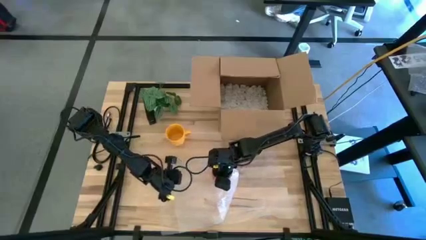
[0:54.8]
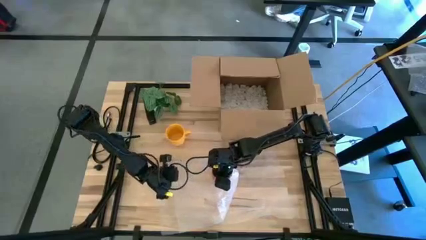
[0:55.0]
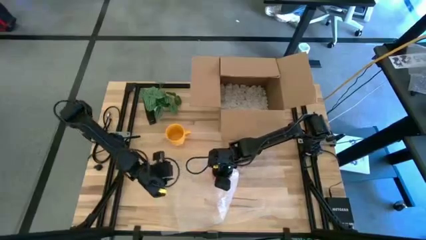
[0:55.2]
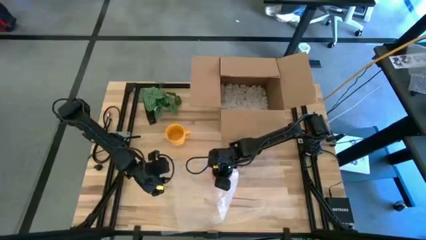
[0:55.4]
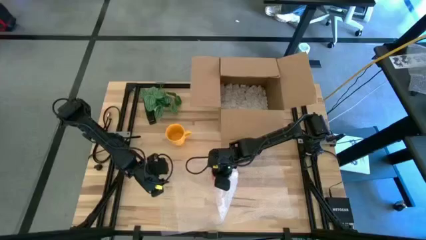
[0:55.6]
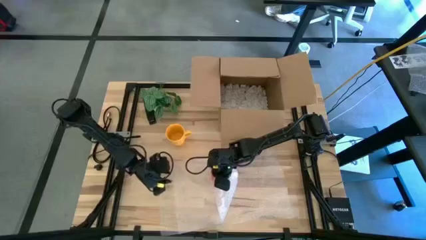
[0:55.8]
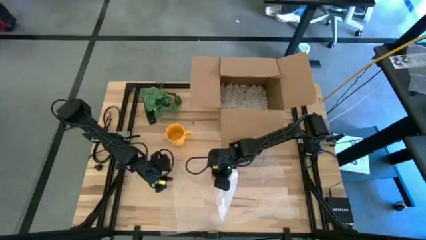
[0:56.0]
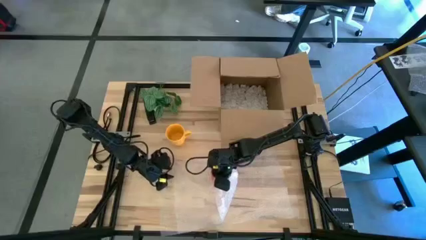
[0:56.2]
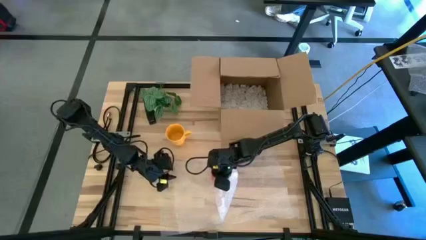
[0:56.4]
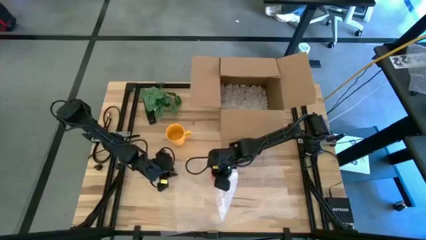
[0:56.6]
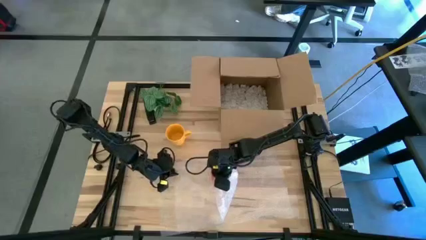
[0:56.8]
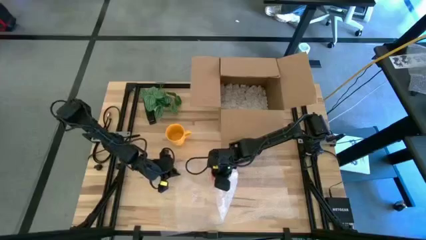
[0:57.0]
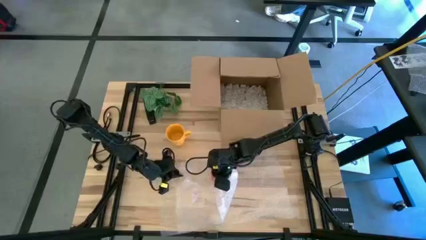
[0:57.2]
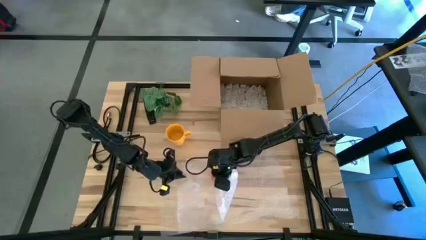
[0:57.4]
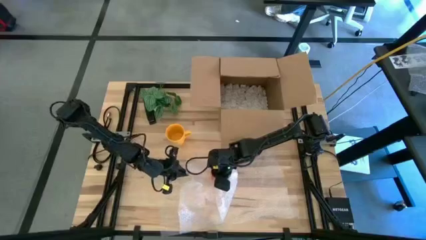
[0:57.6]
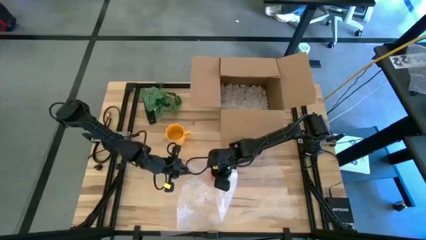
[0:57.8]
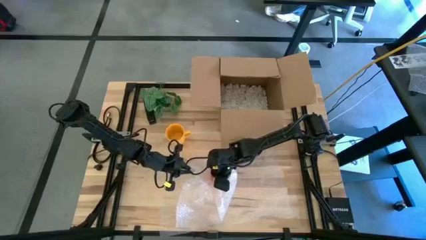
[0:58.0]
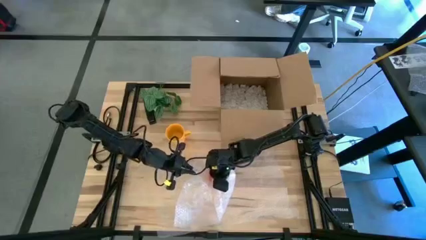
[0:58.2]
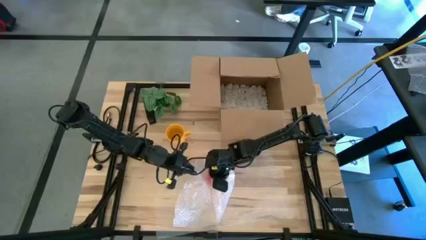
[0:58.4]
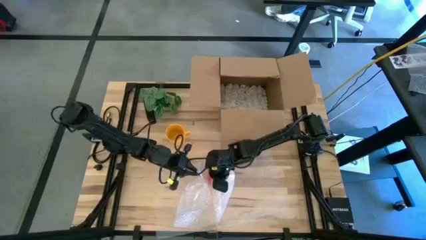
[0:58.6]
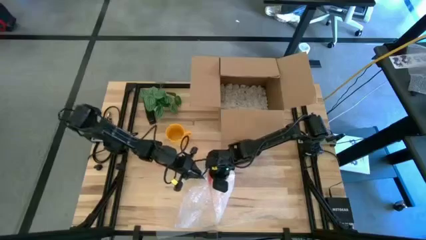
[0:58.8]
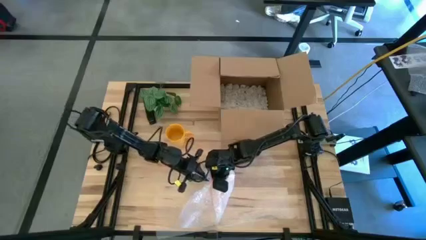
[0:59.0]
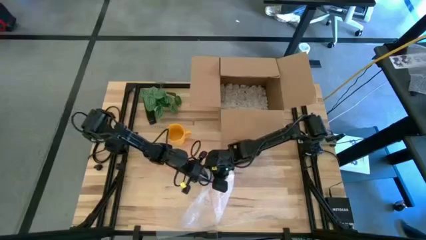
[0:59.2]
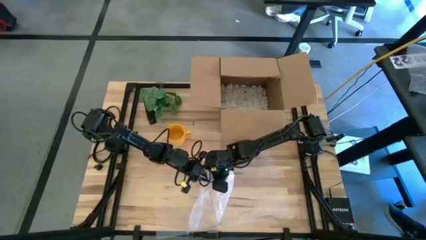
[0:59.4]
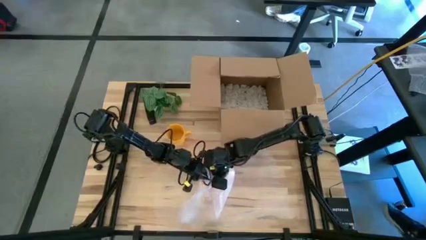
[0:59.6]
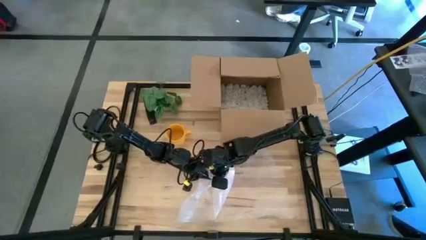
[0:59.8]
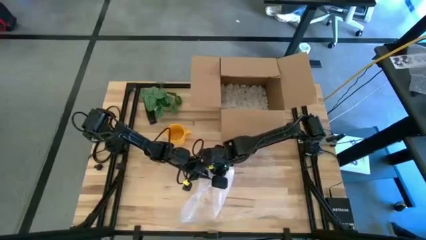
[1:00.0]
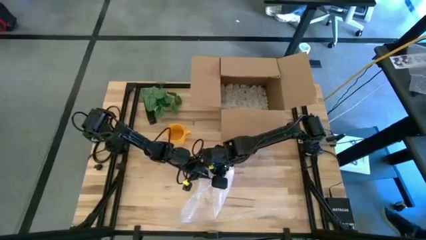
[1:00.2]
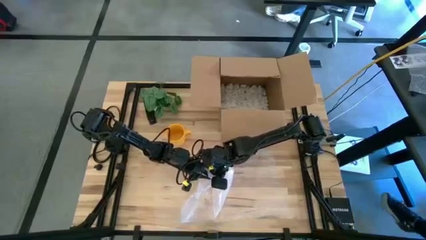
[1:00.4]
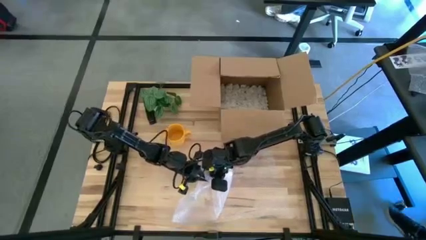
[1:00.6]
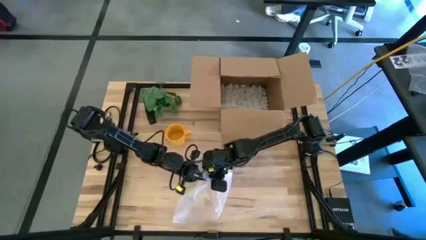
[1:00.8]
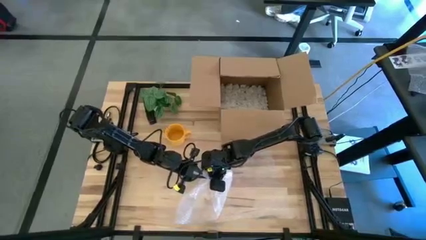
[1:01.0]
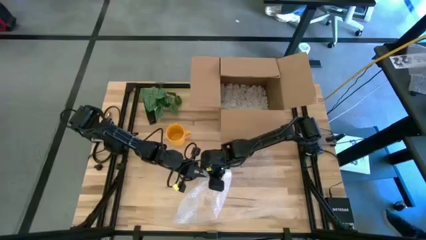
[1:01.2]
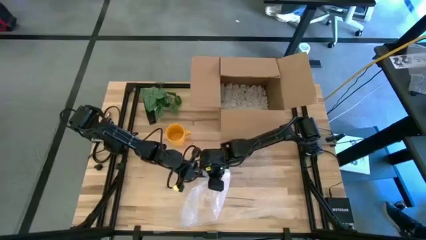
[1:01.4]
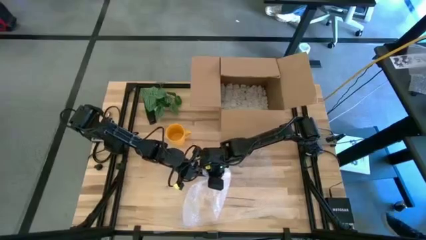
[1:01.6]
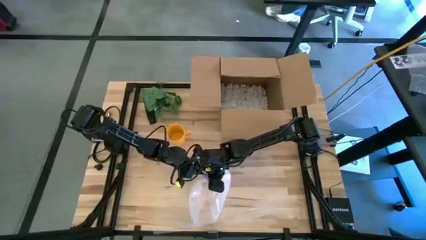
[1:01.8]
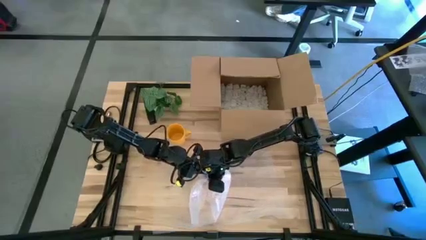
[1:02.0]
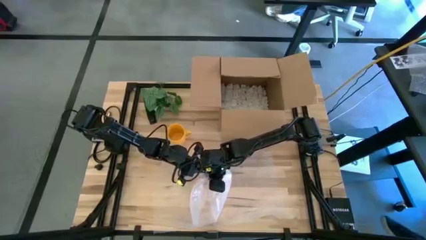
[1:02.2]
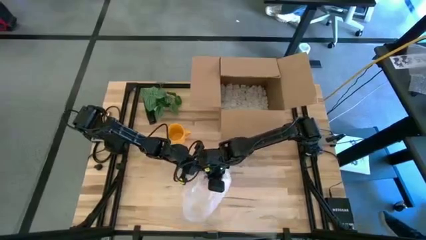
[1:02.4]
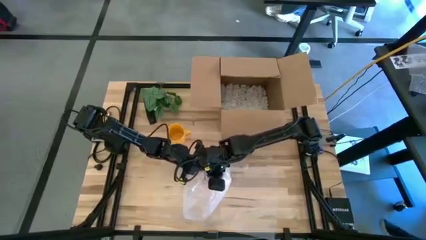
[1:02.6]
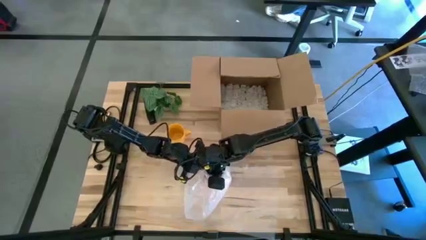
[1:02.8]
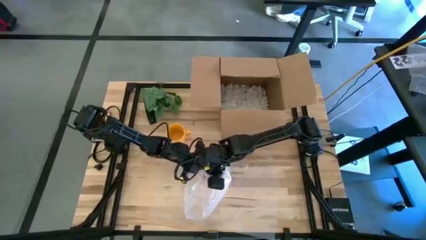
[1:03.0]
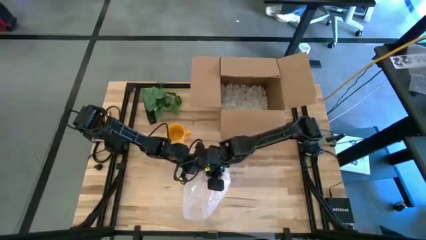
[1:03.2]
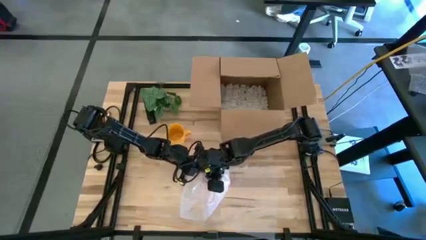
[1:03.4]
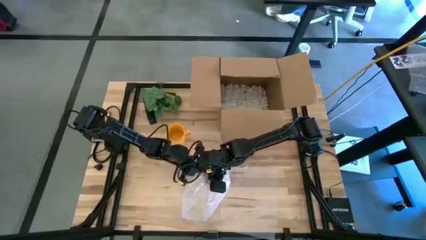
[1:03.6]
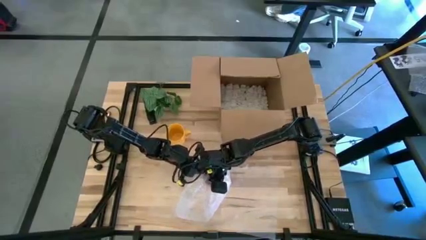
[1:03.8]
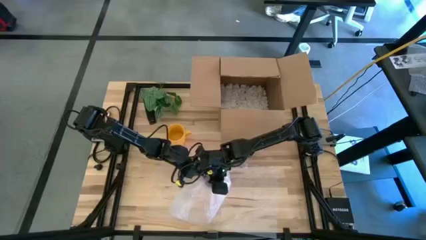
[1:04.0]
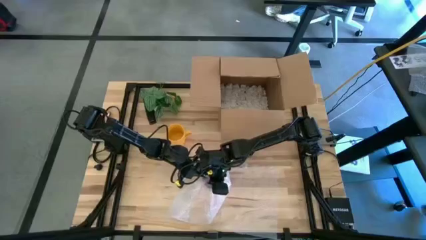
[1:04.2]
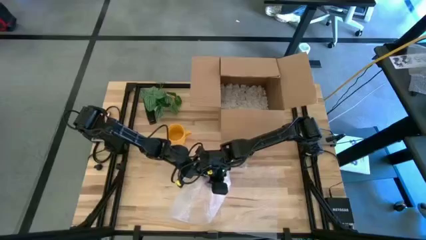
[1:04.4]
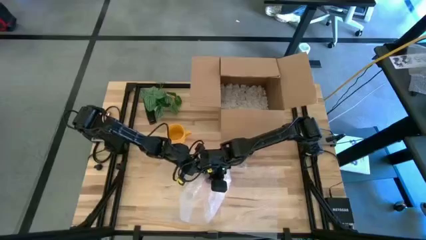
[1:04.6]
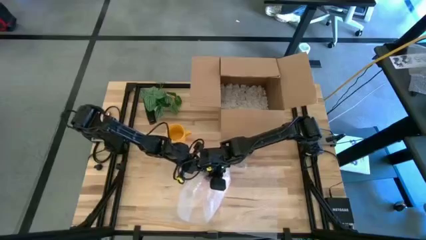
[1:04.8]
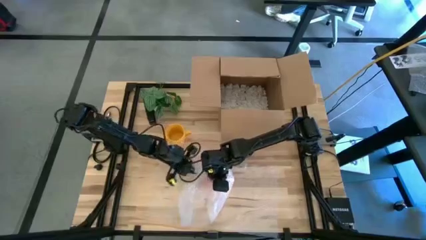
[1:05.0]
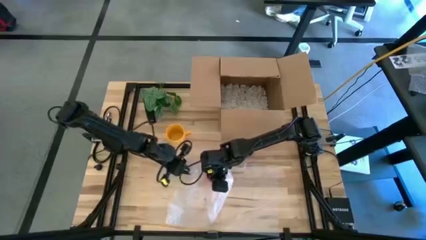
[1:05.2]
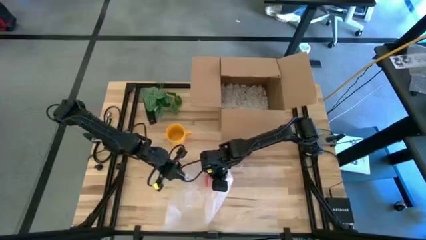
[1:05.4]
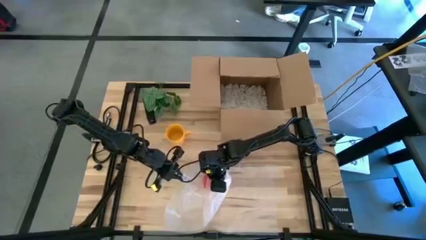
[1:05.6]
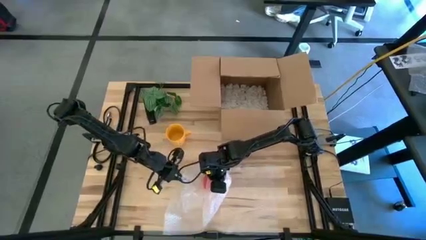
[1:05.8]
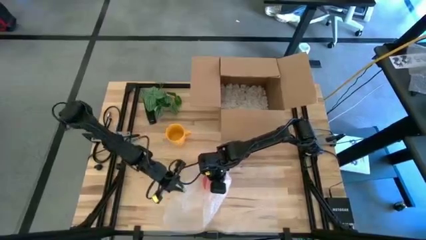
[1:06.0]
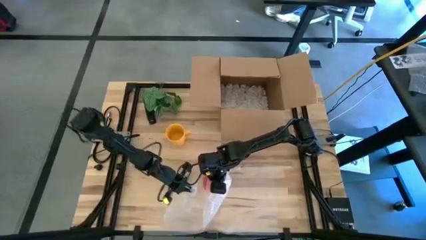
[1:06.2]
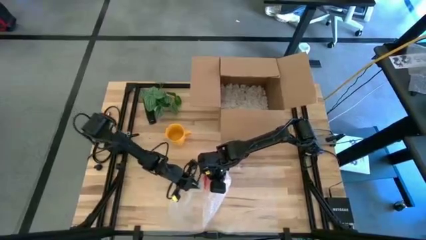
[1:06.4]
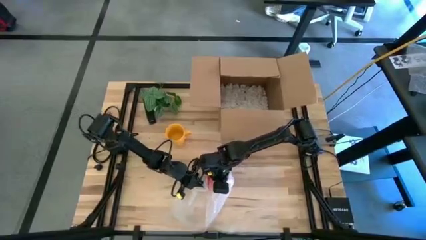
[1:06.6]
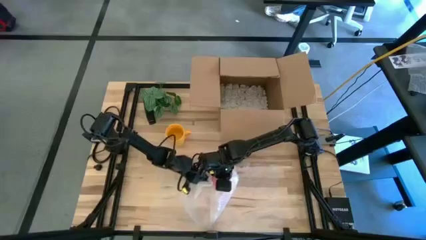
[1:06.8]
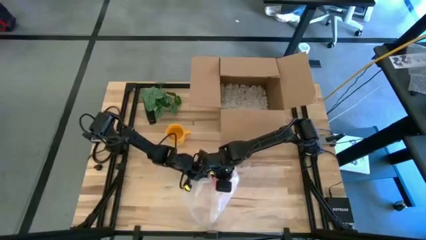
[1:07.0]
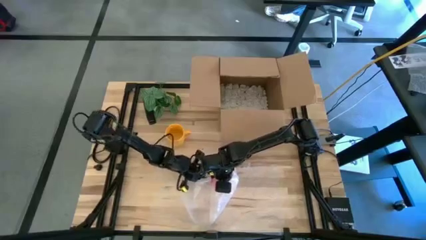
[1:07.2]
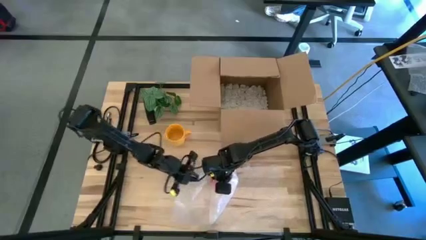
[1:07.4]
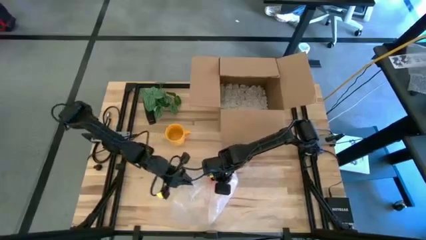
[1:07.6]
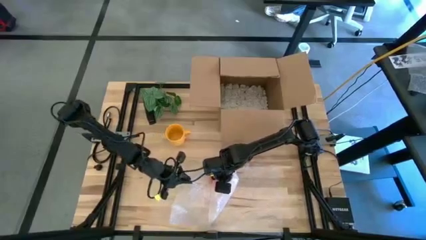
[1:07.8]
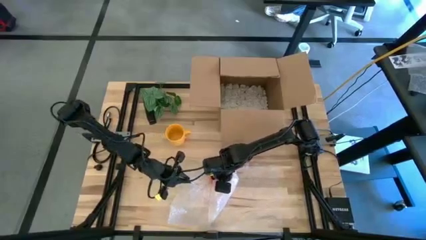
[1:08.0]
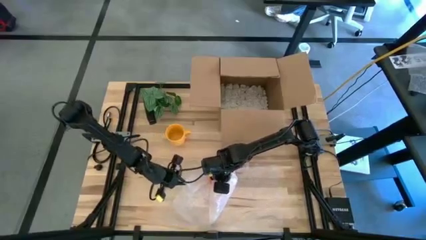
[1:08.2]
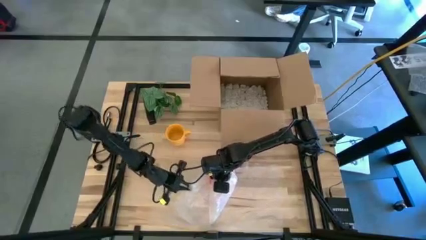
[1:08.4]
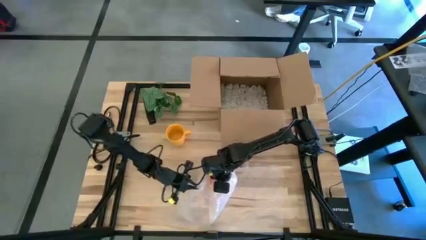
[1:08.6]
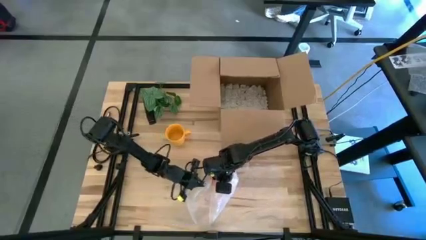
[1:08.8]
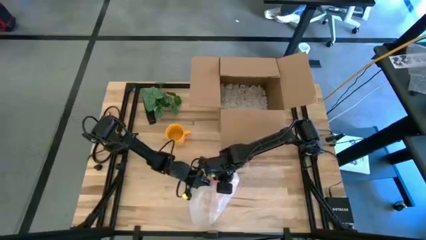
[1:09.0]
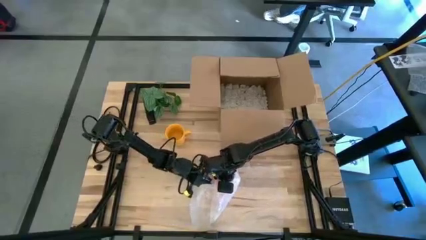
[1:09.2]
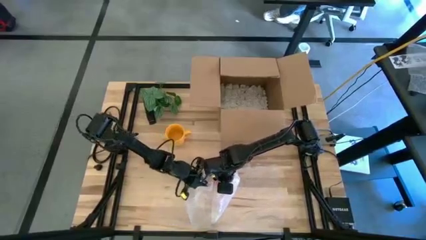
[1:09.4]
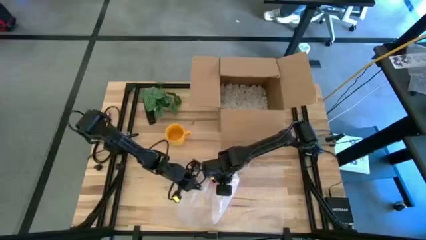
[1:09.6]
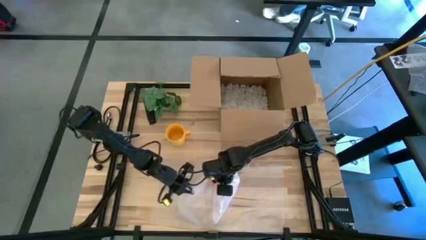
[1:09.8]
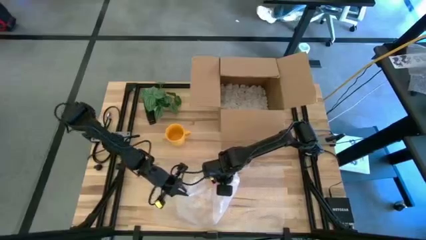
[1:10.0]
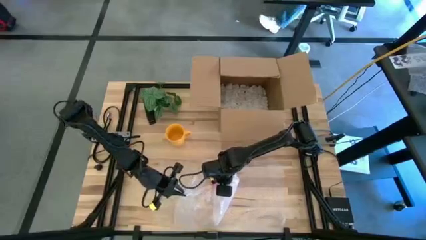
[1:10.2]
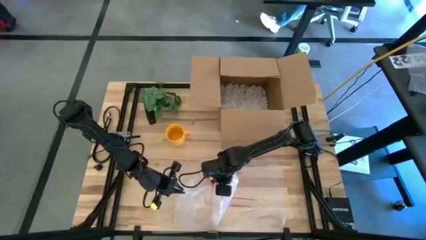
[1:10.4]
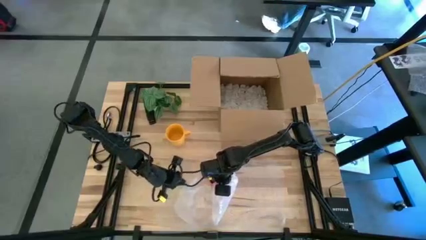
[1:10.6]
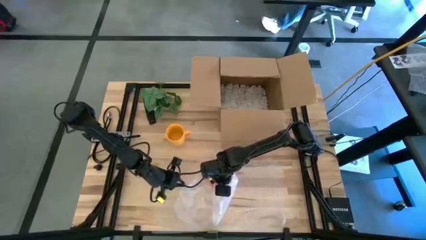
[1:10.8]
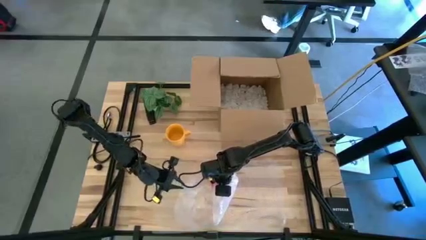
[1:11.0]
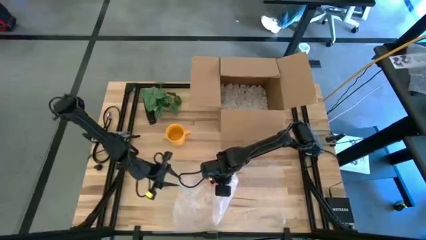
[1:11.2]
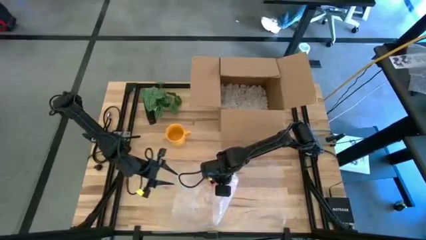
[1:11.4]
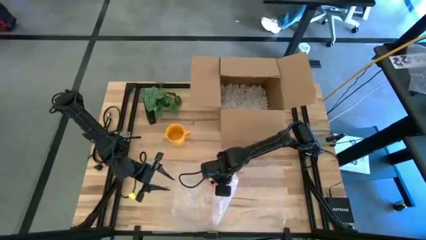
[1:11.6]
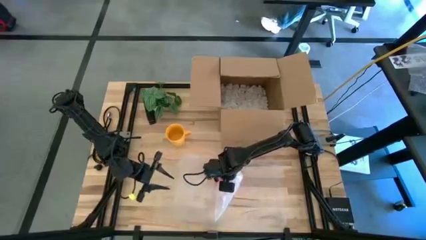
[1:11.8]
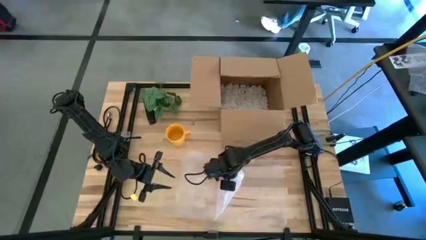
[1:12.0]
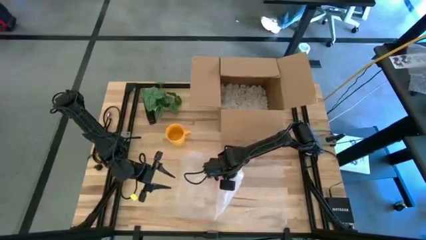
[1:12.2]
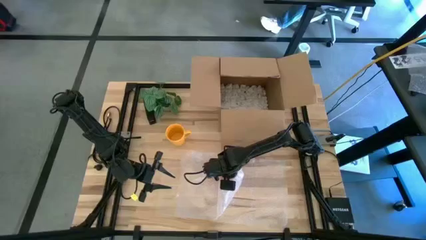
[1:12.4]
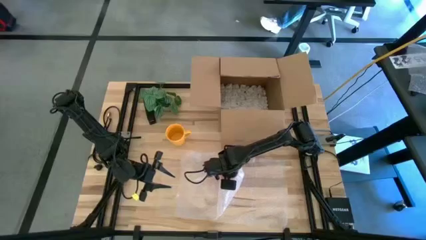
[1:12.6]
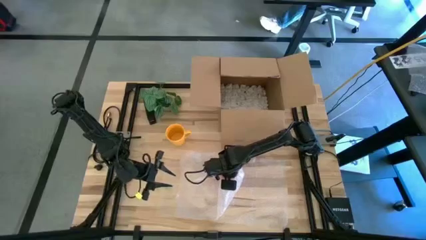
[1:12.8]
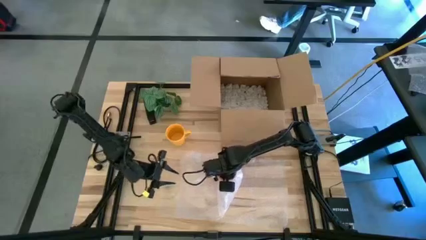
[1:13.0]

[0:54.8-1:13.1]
Task: wrap mug
Wrap the orange mug with the bubble wrap
